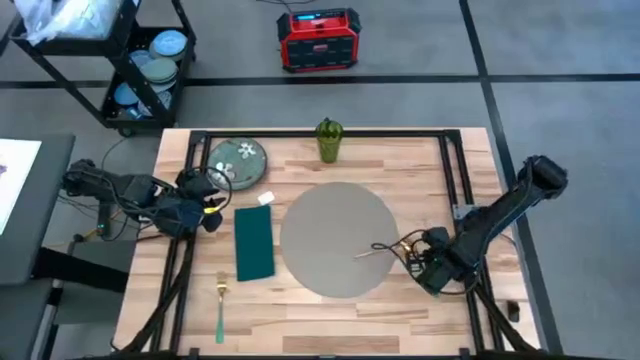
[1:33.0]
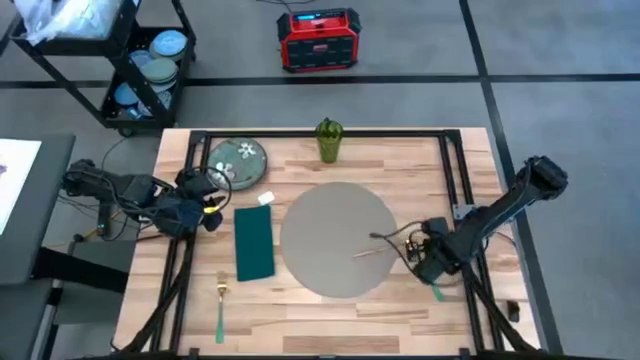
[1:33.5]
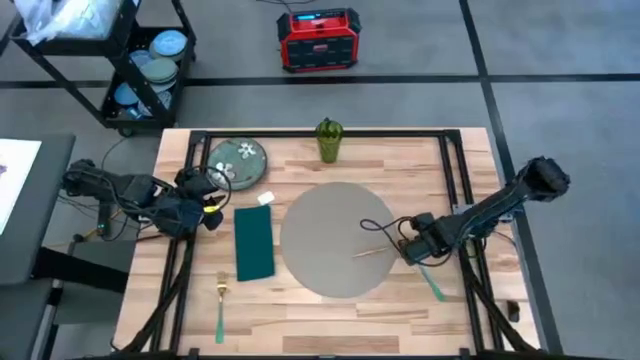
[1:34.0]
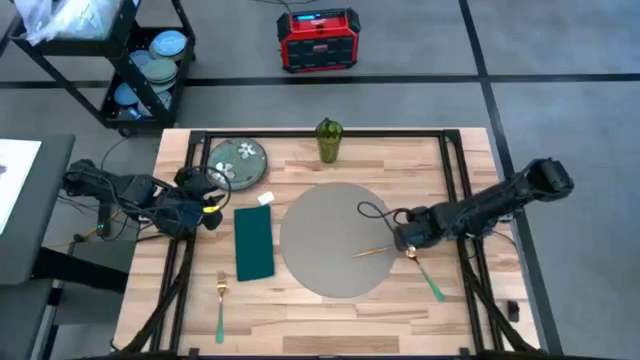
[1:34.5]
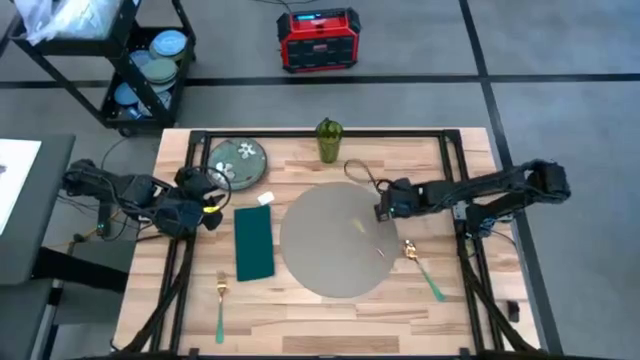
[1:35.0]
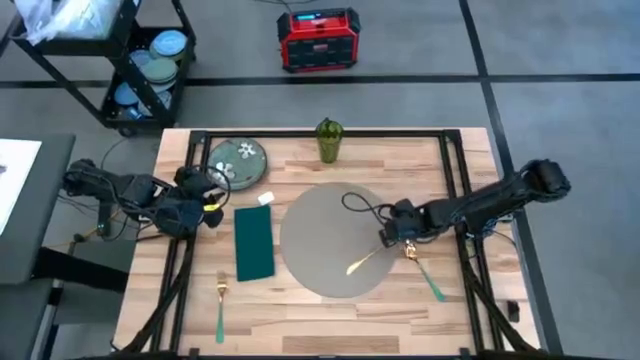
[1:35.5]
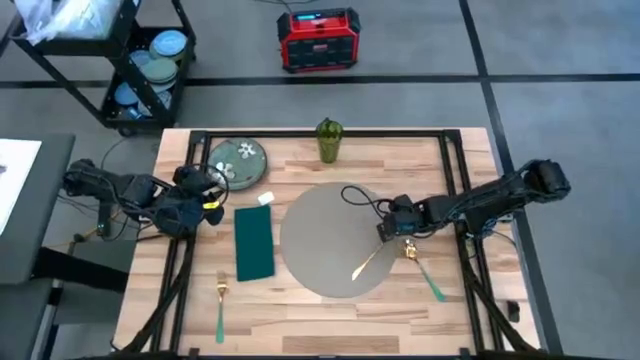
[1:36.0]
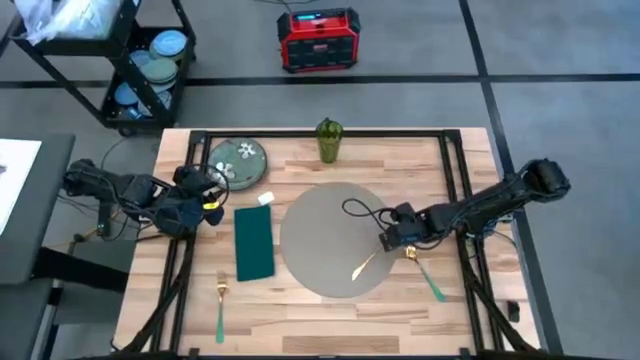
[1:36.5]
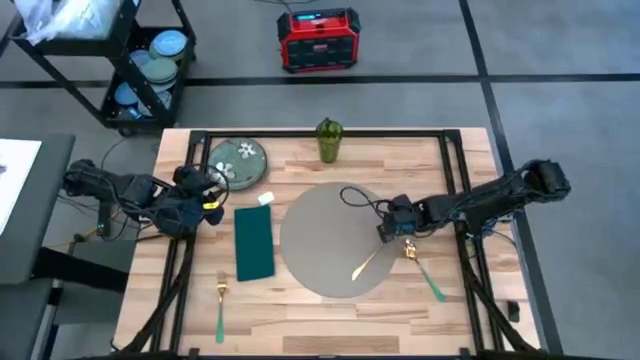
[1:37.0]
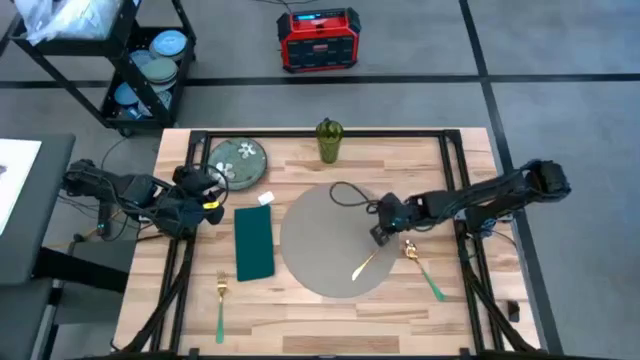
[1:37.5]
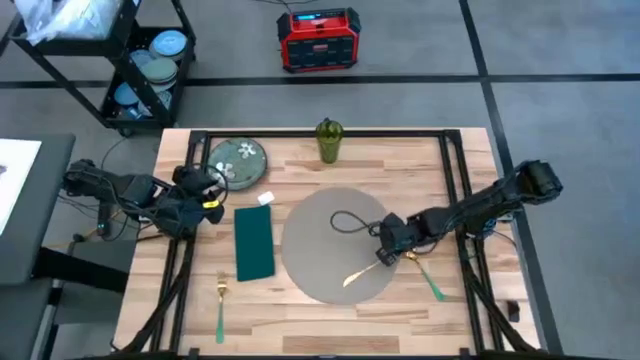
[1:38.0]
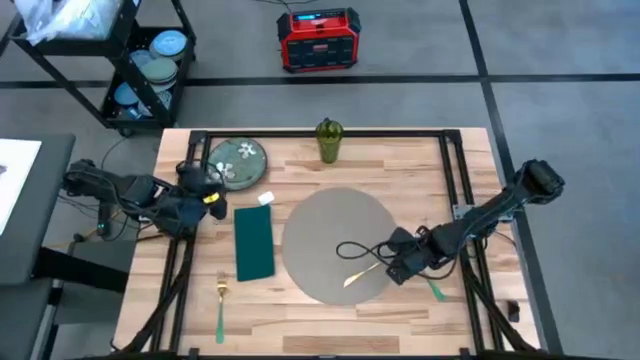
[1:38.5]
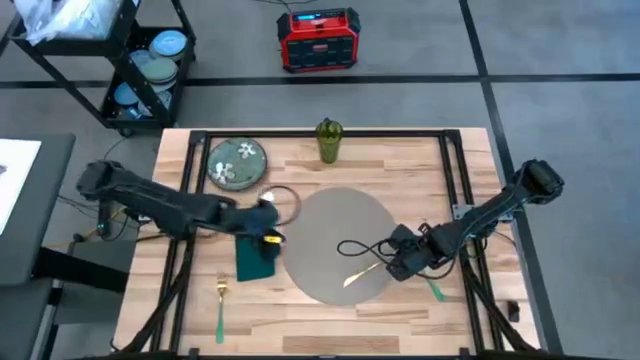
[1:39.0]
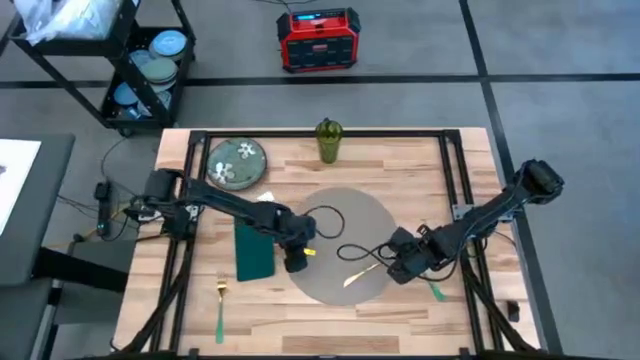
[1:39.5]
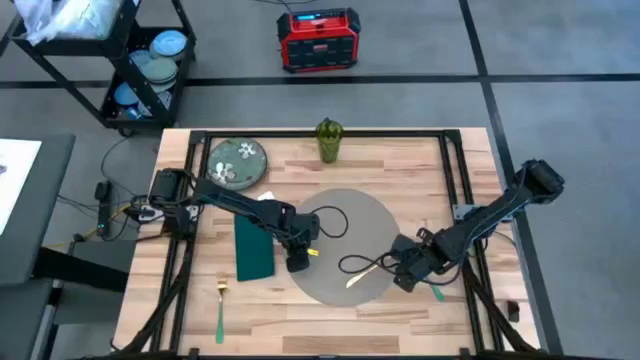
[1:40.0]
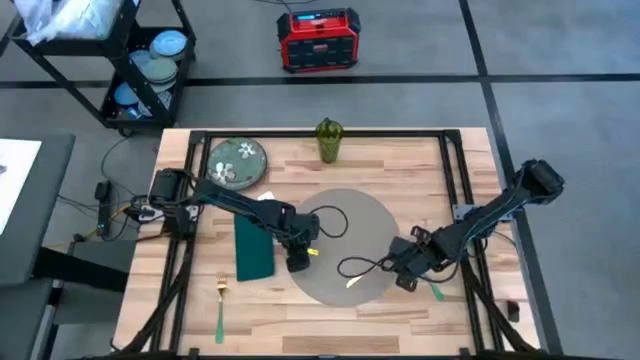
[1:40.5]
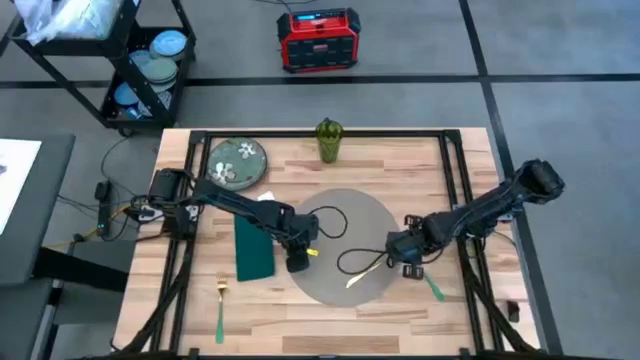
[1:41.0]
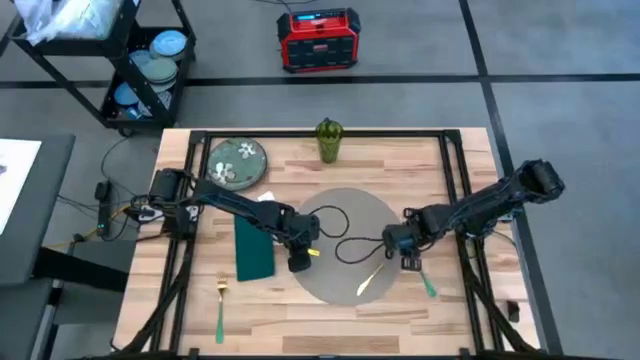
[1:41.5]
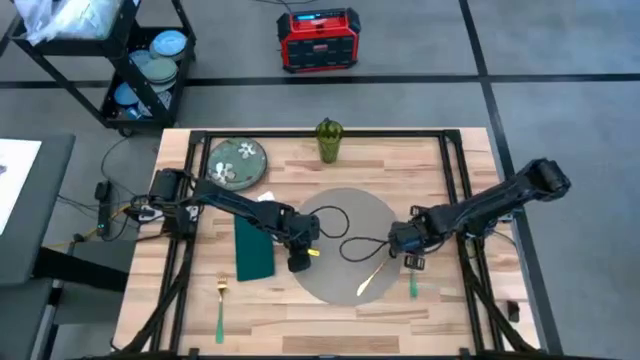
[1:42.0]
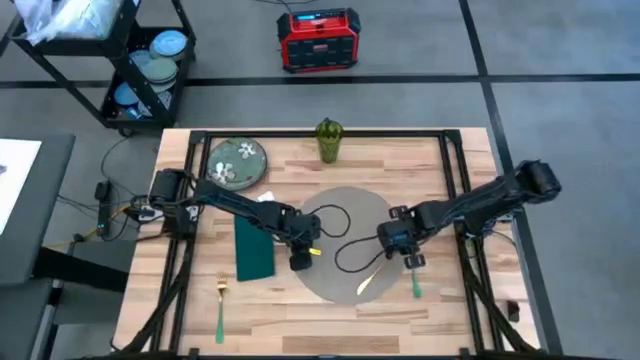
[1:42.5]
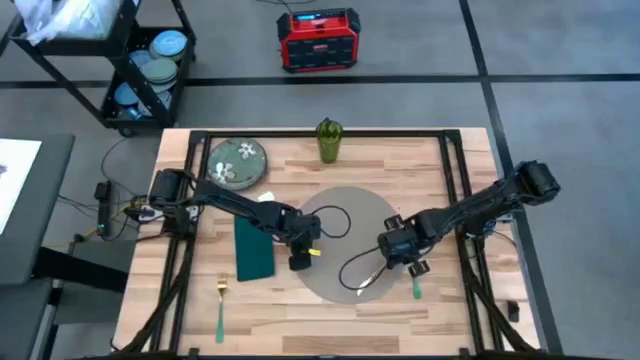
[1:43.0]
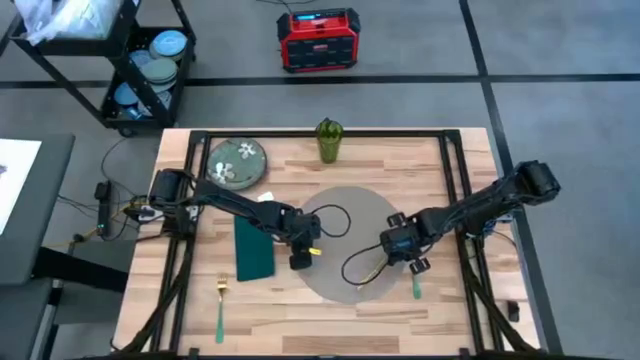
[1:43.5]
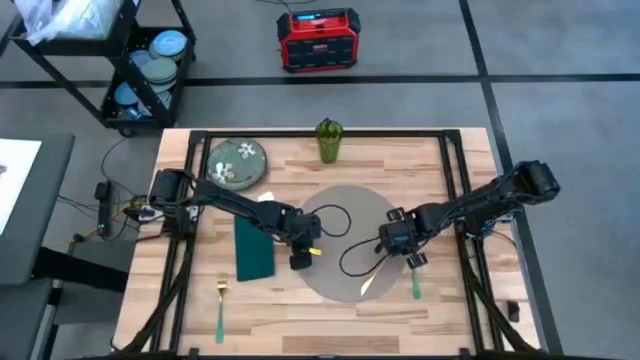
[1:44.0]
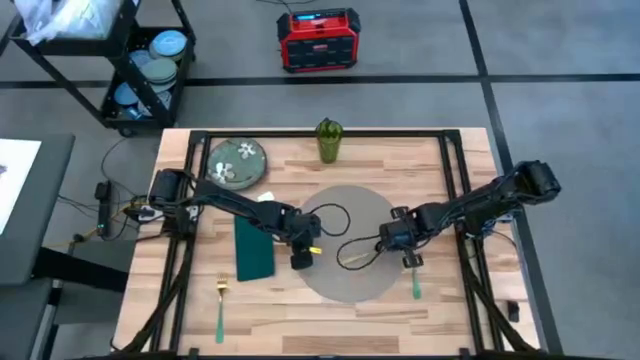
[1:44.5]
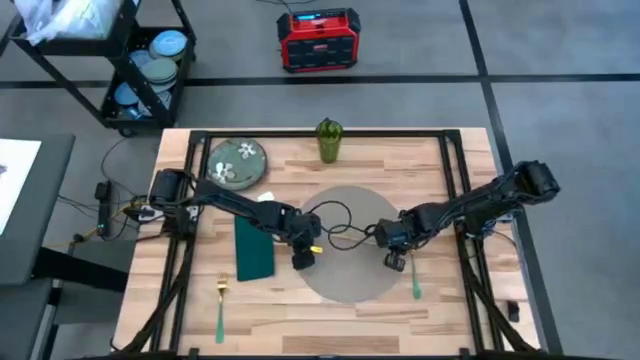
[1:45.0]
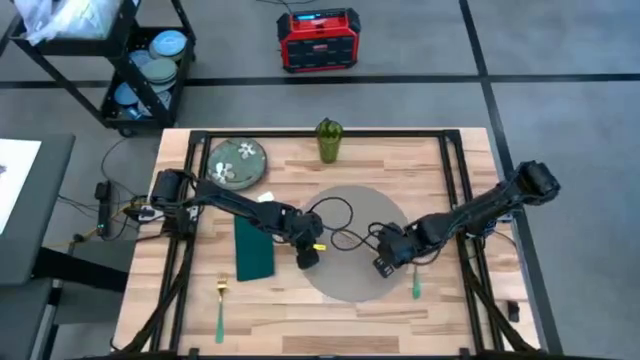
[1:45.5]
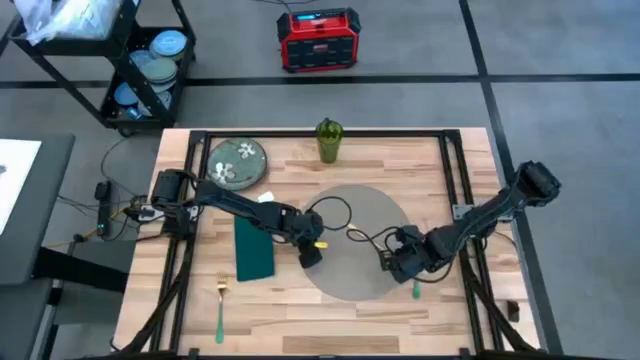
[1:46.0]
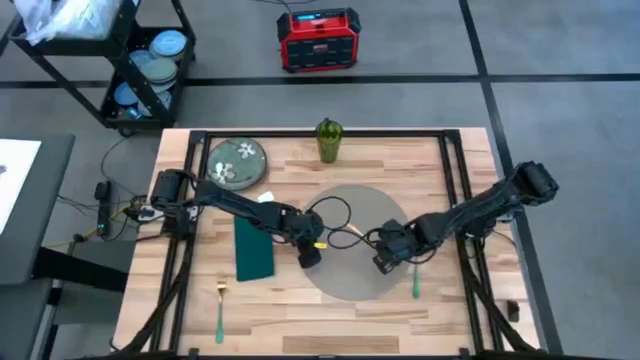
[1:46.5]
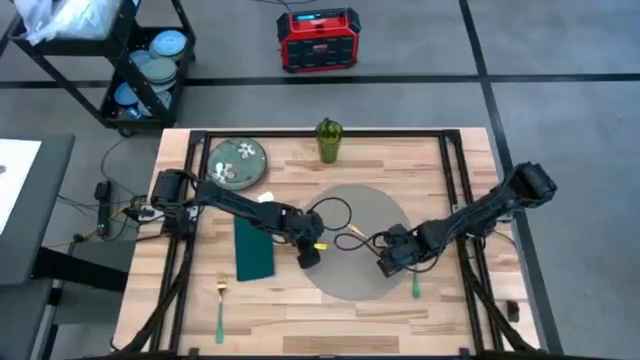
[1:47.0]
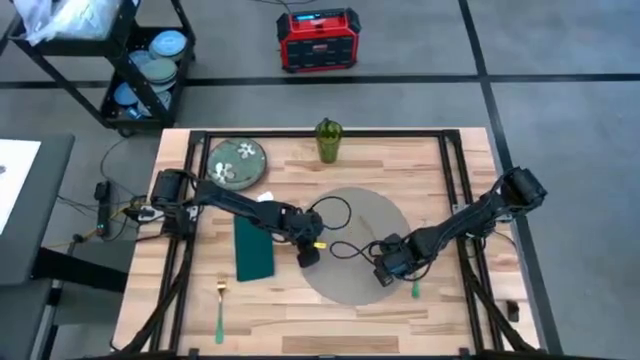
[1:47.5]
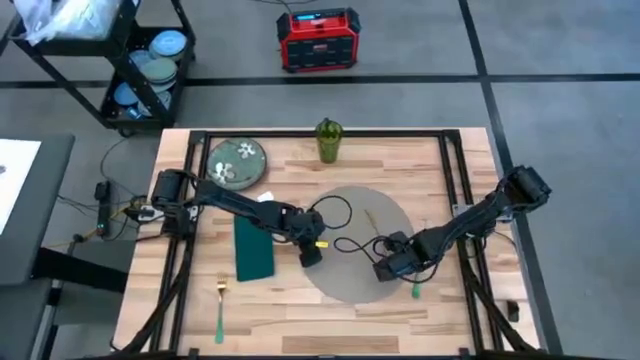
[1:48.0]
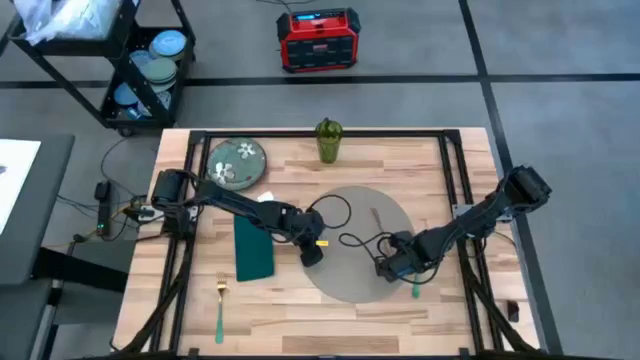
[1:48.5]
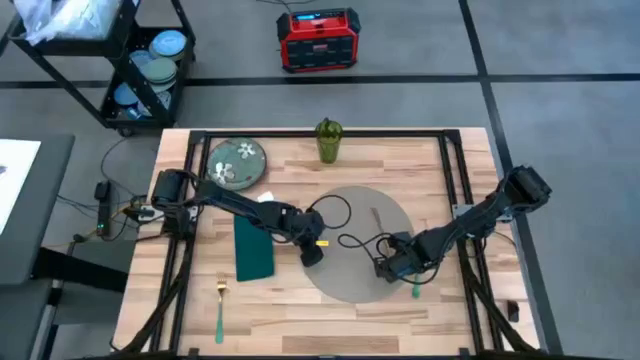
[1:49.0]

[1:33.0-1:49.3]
Task: Set table place
Adjust the gold knife on the gray table mat

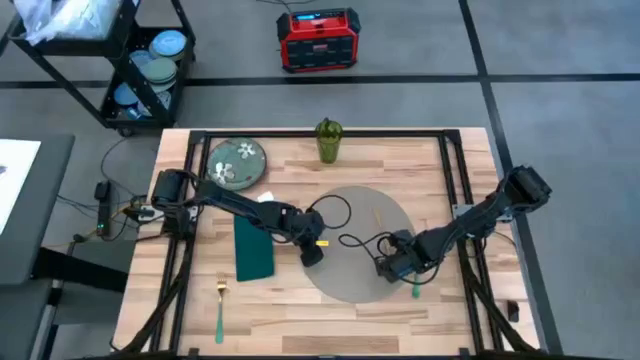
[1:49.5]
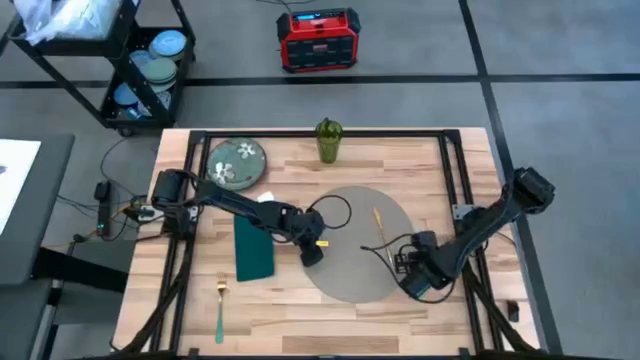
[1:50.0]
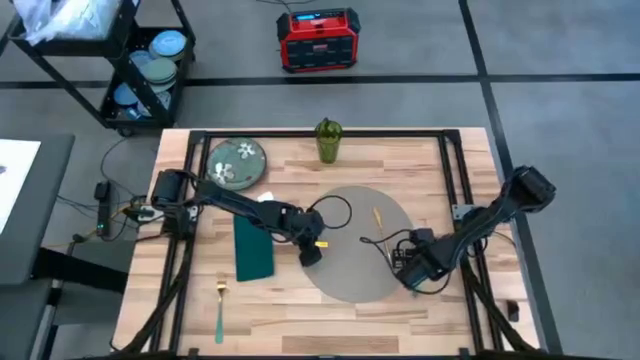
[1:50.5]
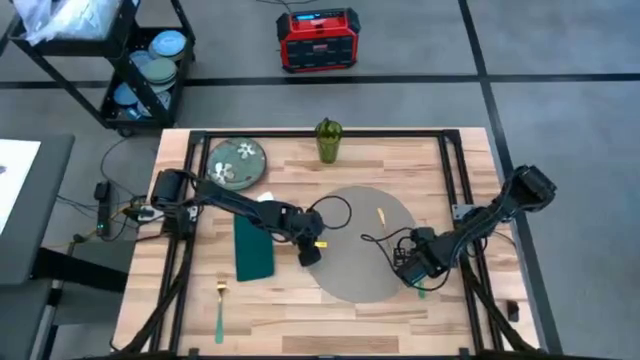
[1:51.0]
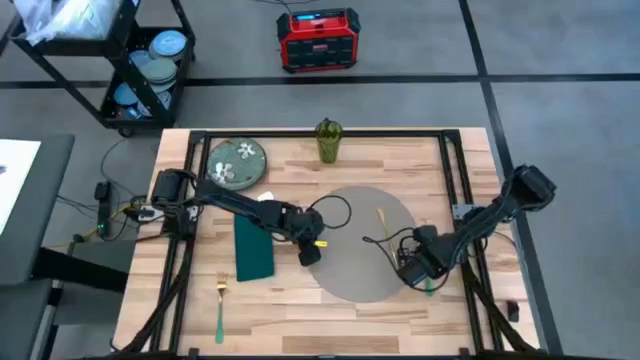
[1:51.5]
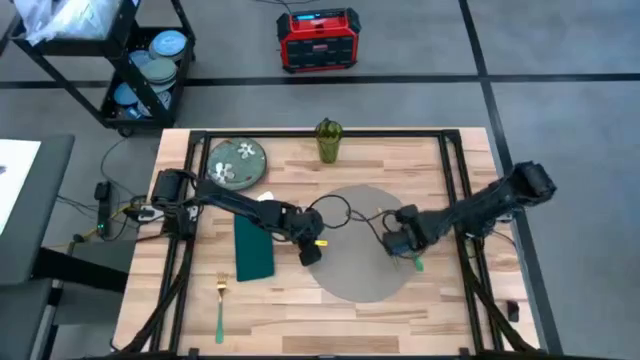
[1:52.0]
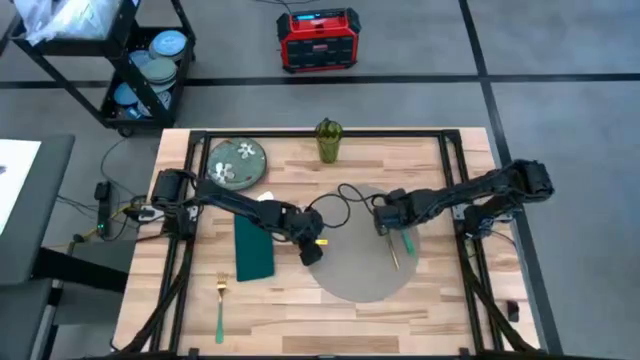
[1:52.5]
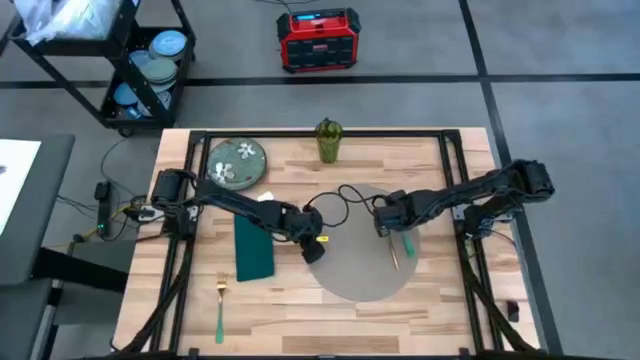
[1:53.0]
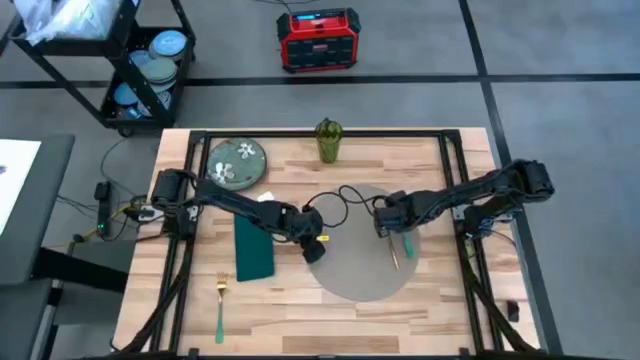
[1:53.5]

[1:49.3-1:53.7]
Move the green spoon to the right of the gold knife

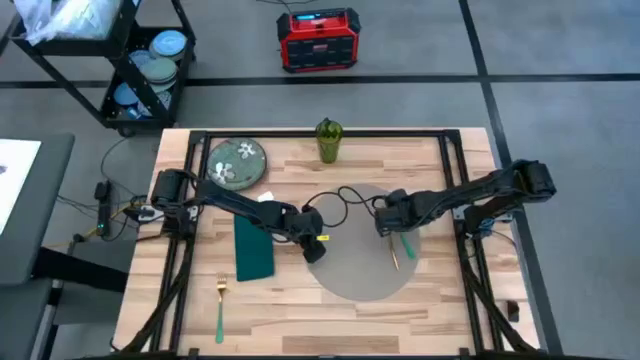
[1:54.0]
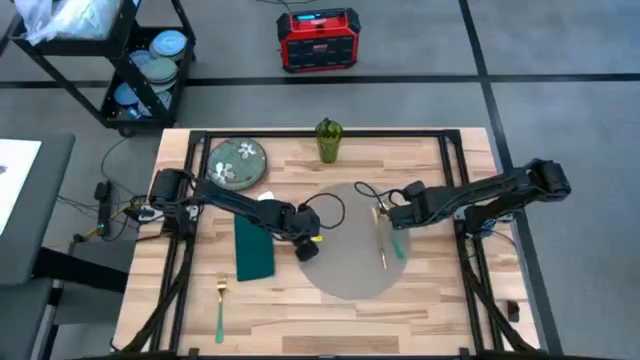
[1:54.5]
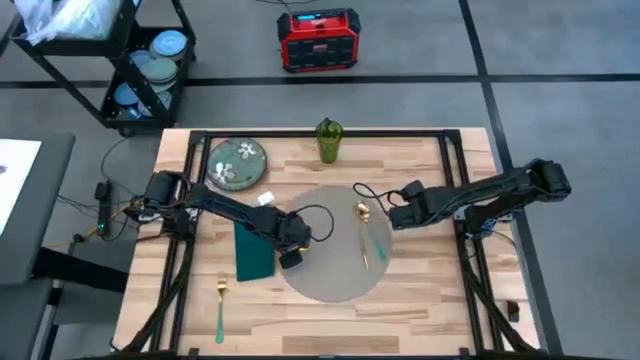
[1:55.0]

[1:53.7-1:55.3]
Adjust the gray table mat to the center of the table
